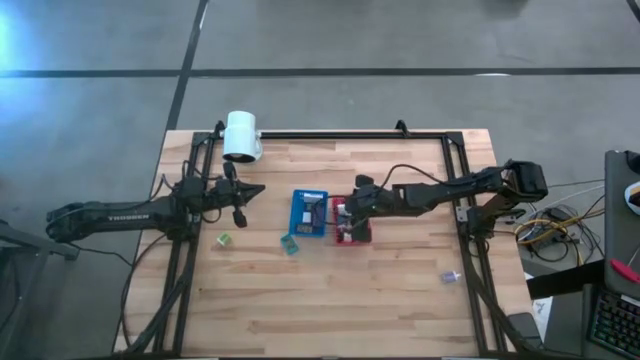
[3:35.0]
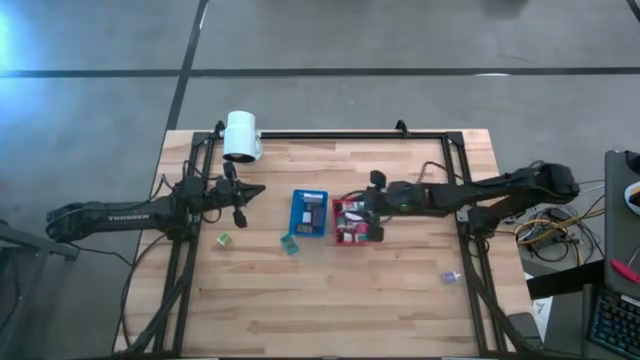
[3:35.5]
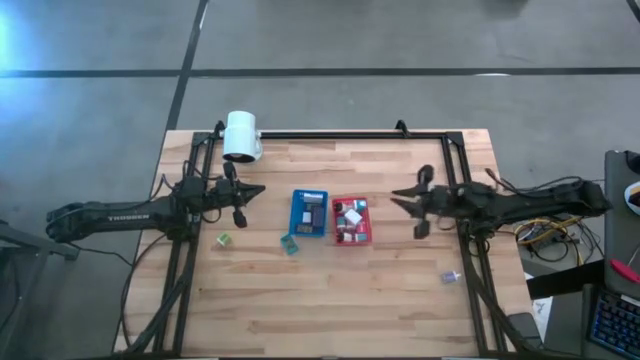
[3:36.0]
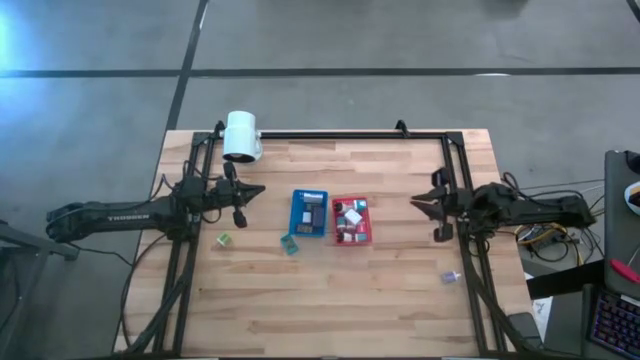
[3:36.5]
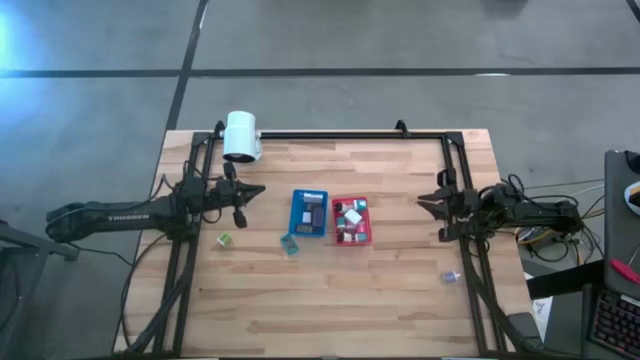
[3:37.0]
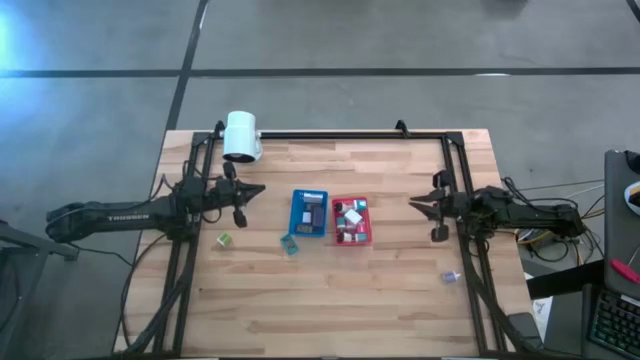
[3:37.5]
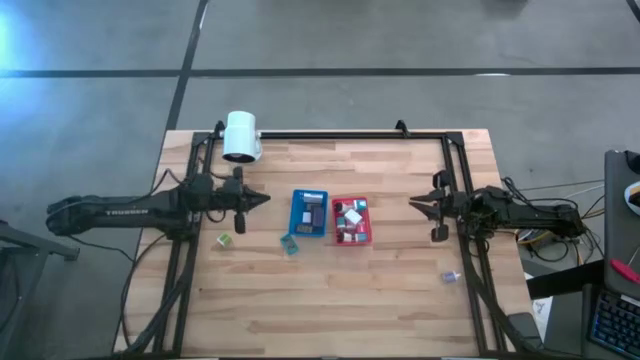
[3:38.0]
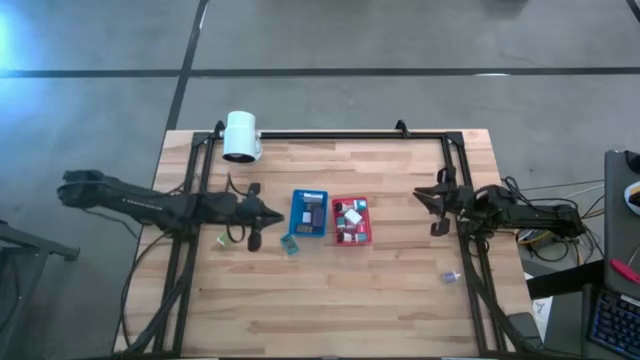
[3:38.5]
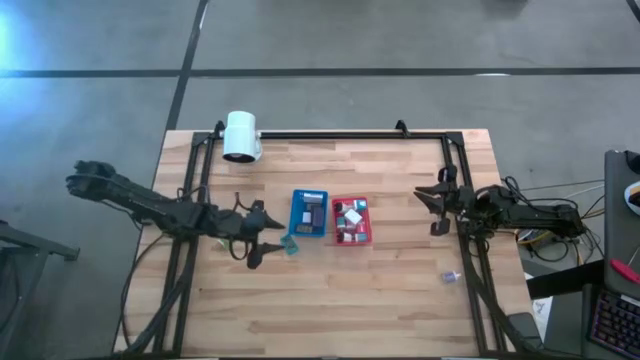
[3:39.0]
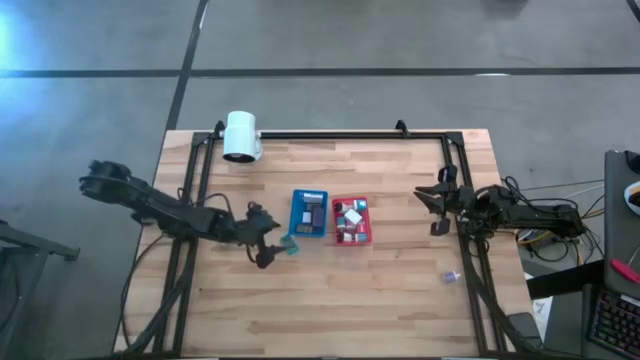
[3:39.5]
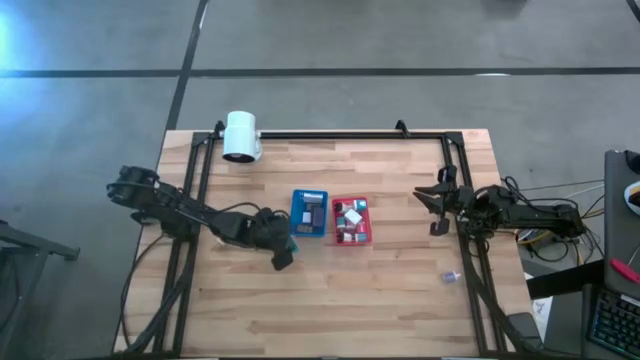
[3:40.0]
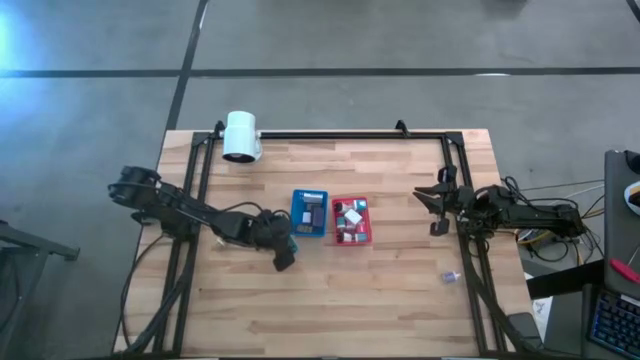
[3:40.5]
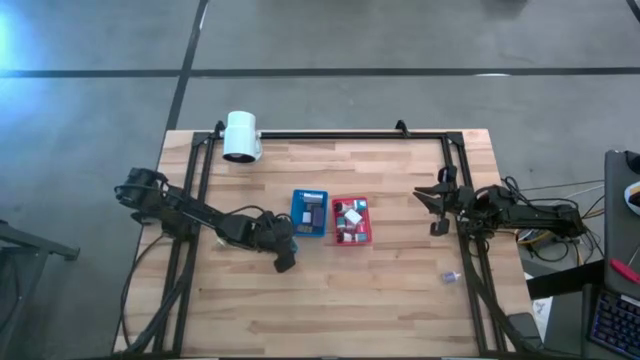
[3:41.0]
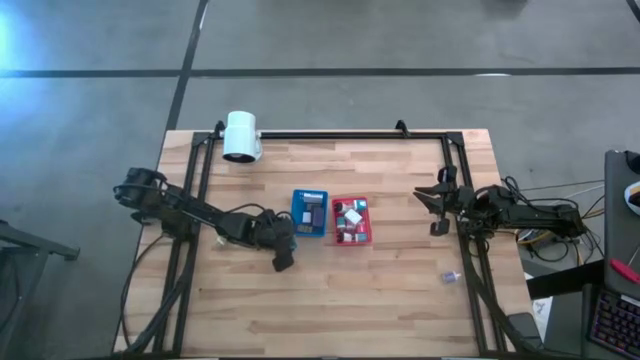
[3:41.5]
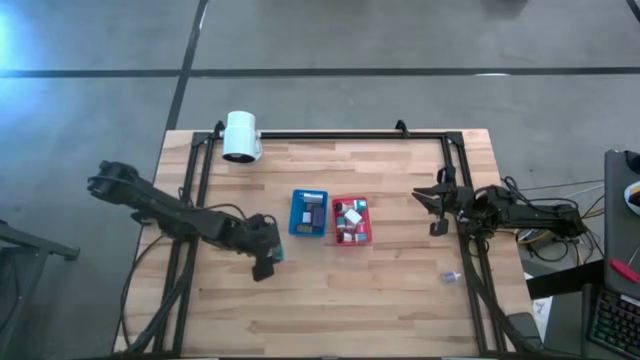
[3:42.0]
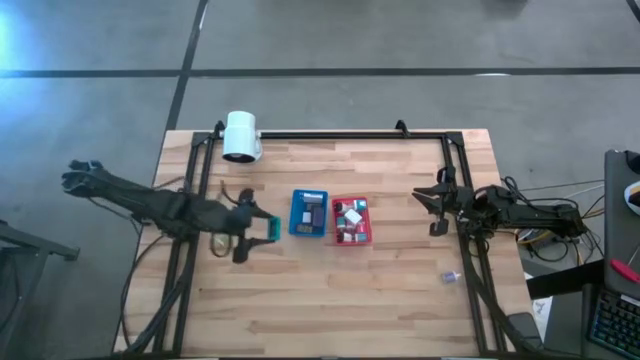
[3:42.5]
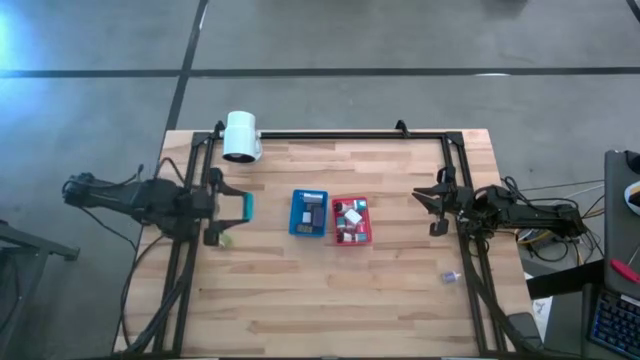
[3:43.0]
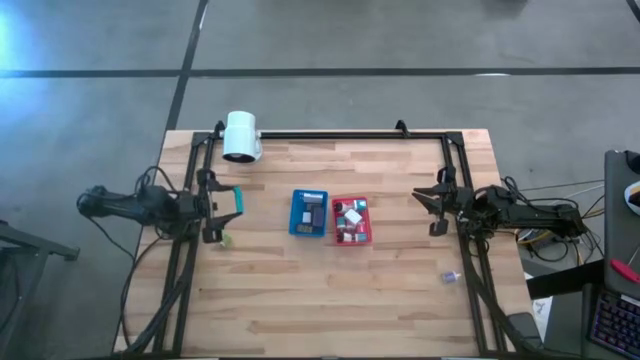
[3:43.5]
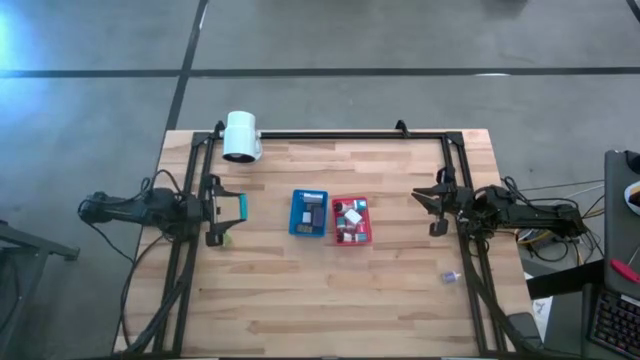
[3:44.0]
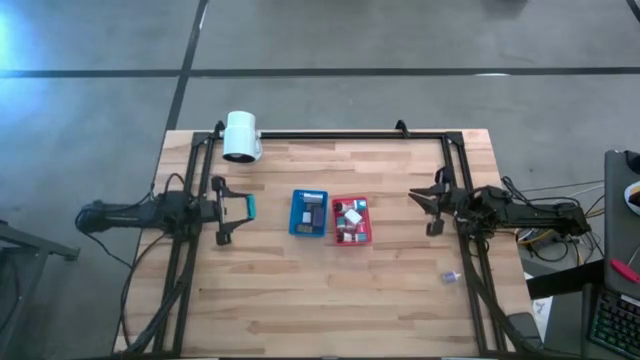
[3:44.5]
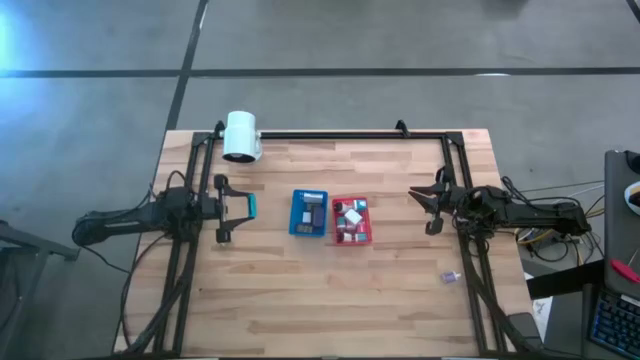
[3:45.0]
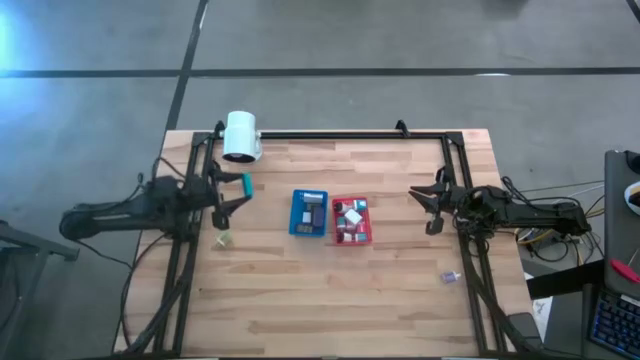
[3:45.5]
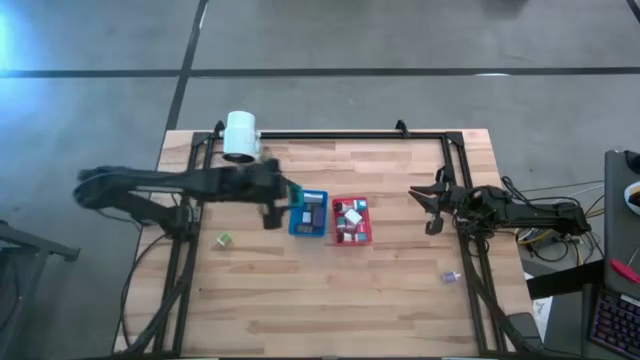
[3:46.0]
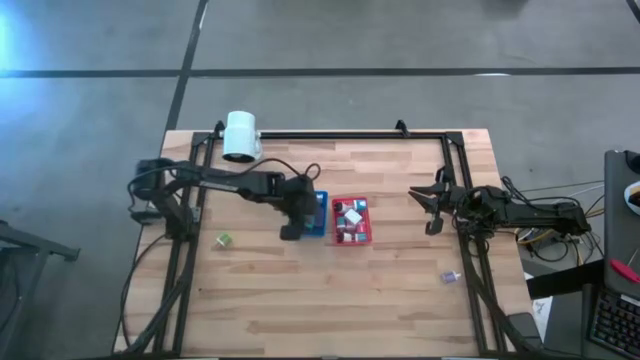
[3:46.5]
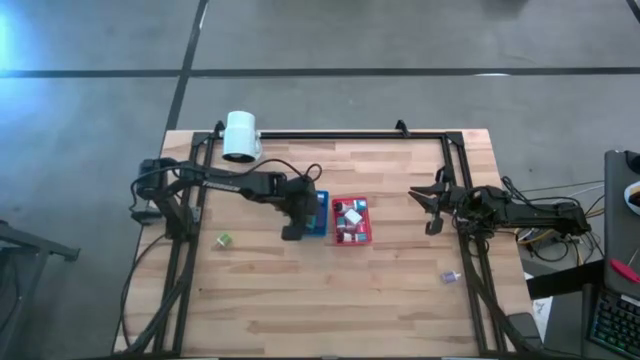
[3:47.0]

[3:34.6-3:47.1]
Task: Pick & Place Office items
Put the light blue digital clock into the blue bin

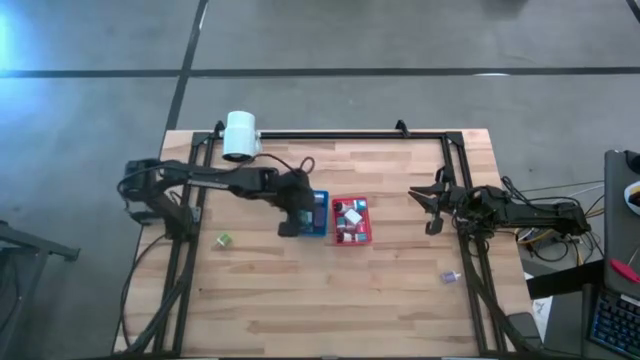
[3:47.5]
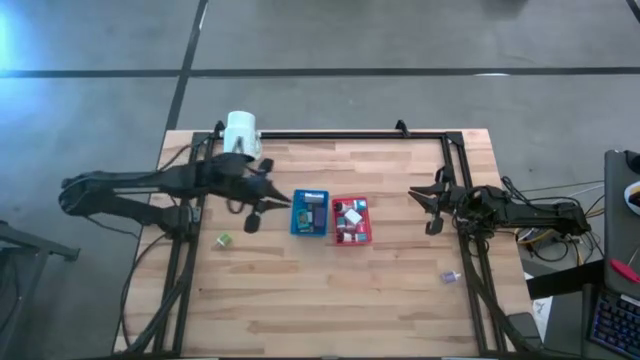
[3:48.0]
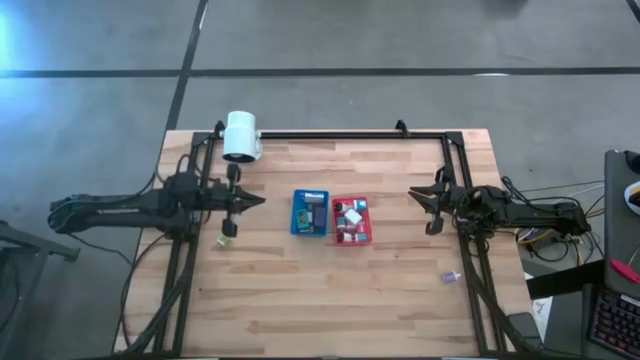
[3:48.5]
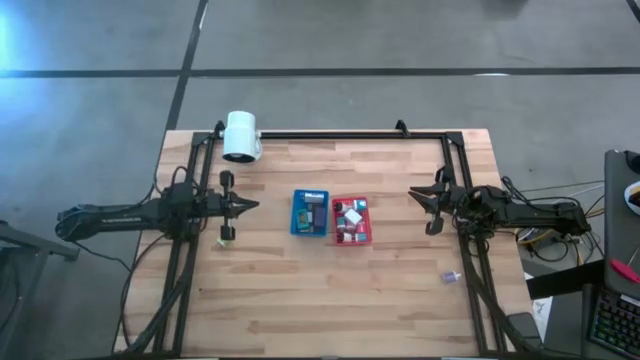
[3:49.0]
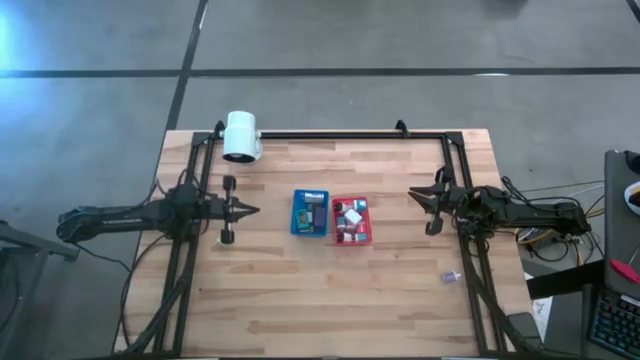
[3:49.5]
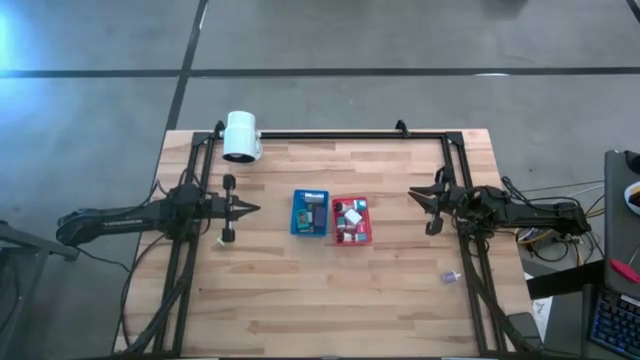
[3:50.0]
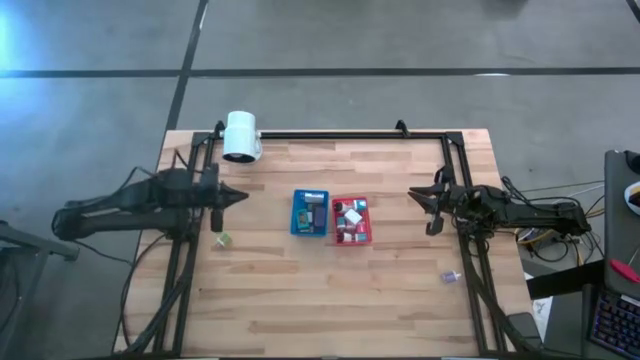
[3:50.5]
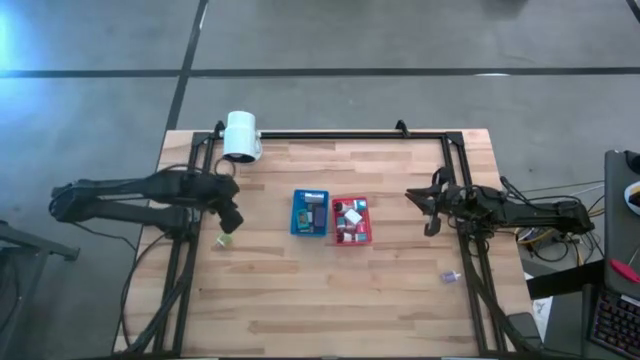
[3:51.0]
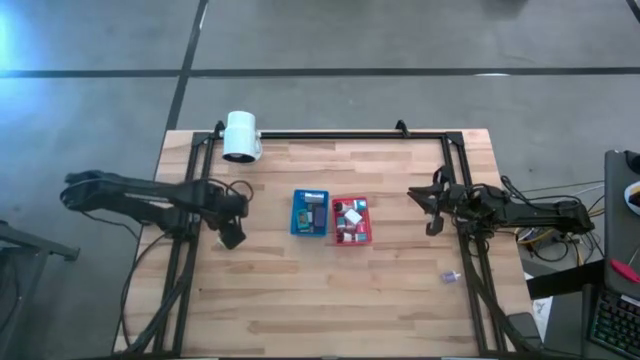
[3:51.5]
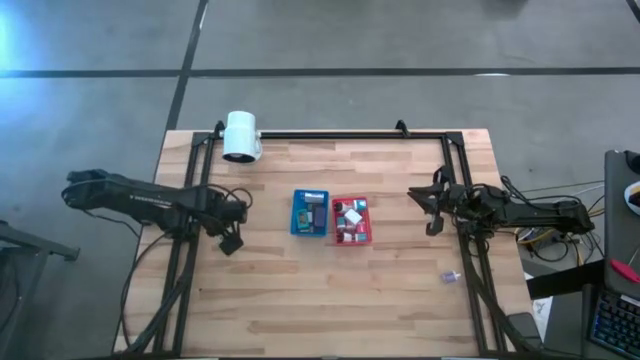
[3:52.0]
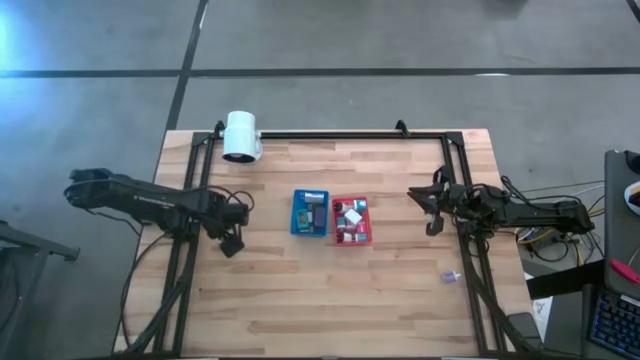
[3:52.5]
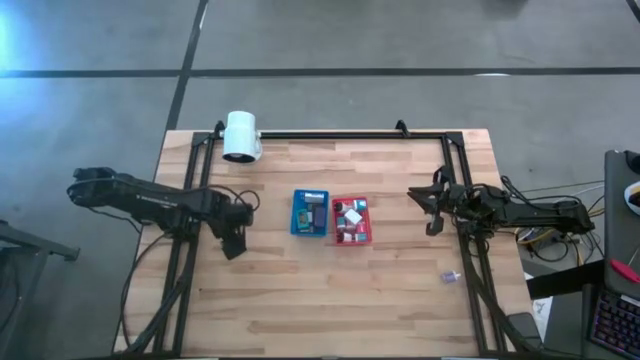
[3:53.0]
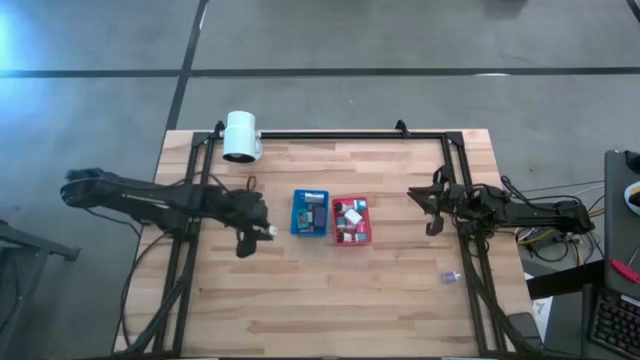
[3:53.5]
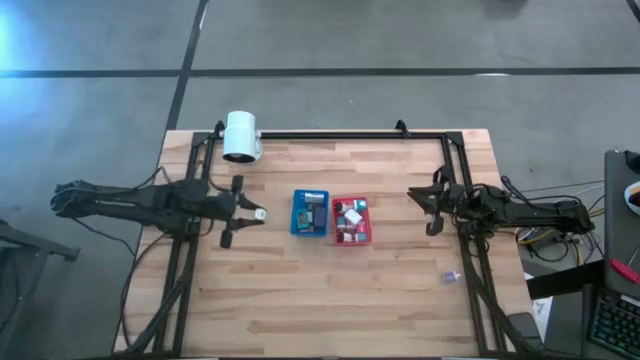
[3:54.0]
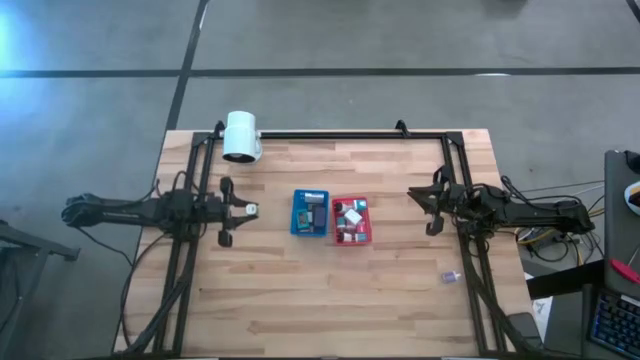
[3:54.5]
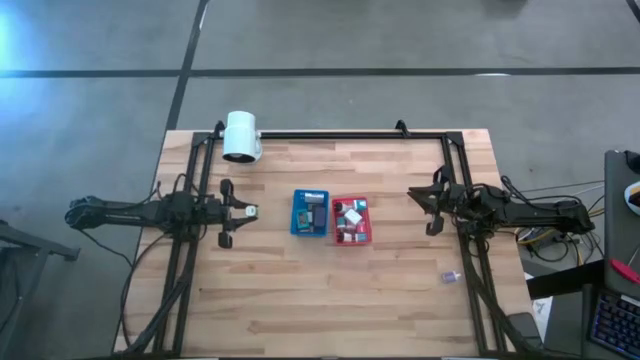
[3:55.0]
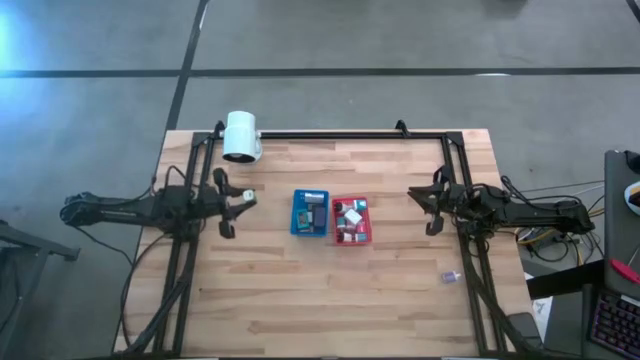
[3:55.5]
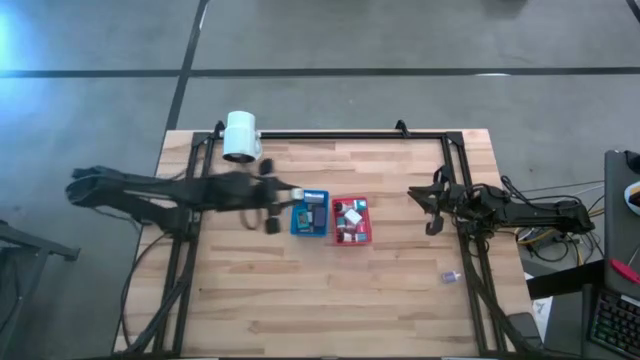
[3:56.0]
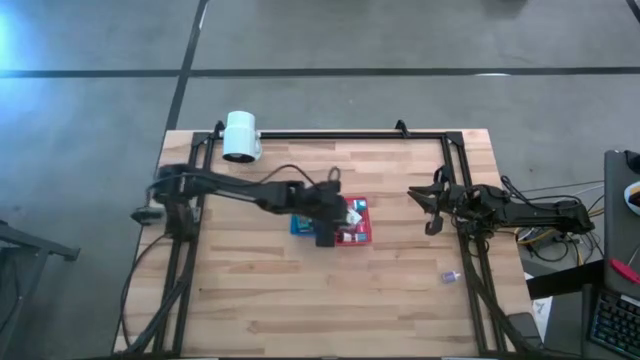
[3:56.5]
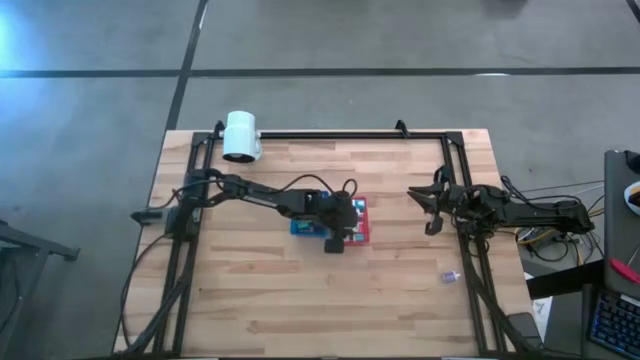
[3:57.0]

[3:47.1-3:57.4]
Put the green adaptor into the red bin
